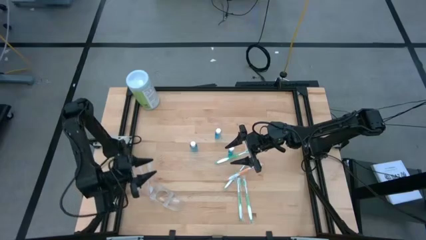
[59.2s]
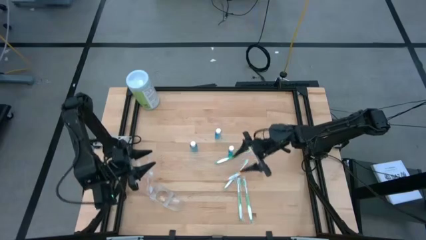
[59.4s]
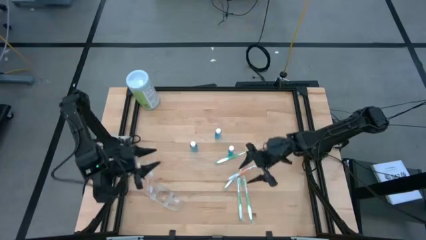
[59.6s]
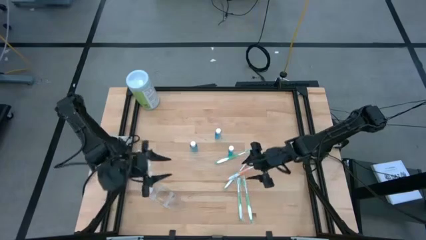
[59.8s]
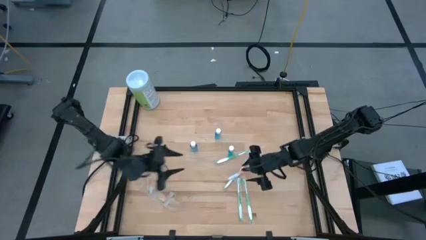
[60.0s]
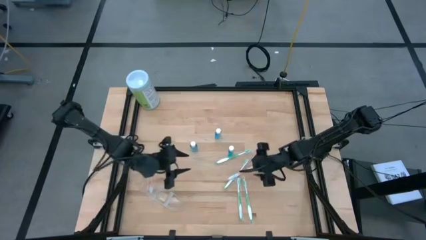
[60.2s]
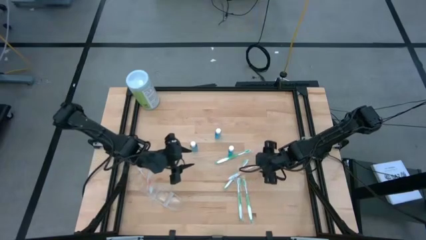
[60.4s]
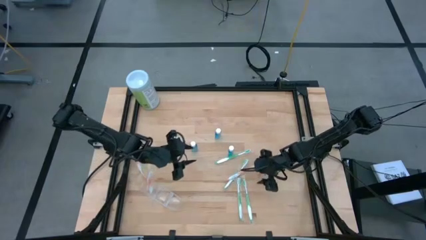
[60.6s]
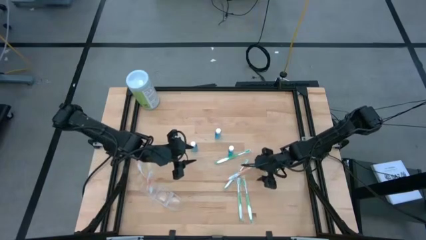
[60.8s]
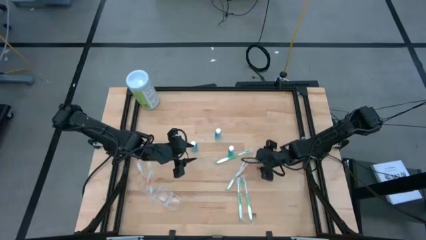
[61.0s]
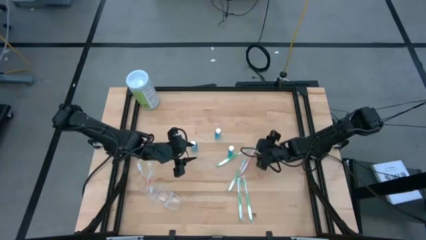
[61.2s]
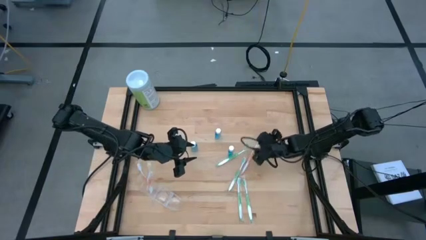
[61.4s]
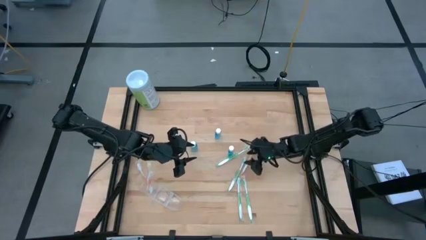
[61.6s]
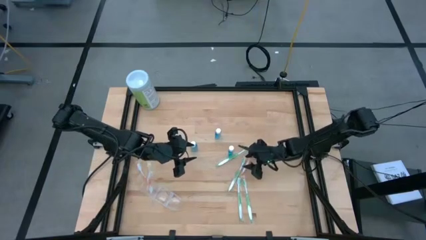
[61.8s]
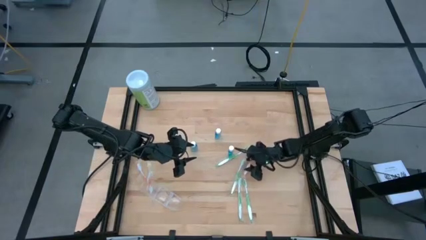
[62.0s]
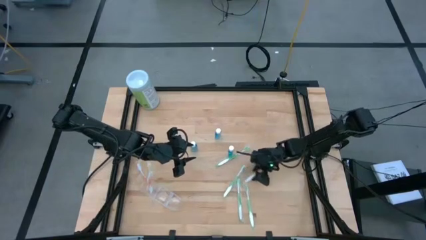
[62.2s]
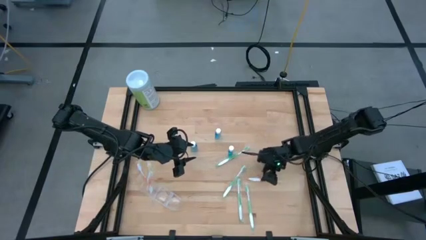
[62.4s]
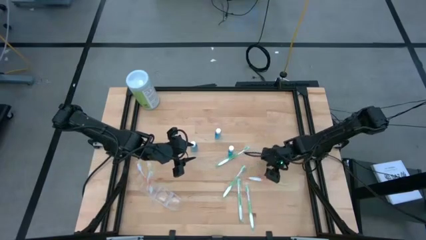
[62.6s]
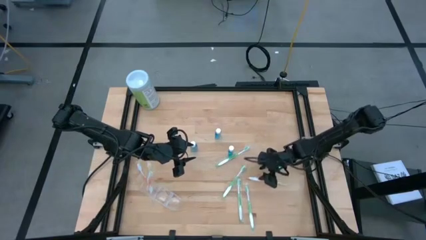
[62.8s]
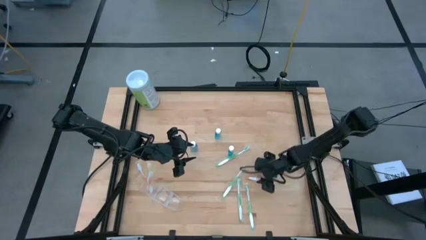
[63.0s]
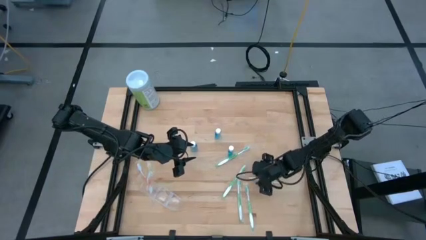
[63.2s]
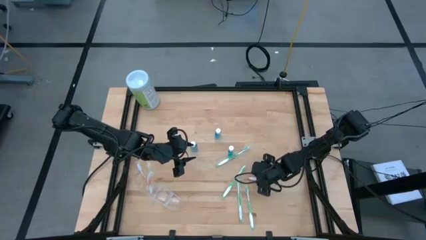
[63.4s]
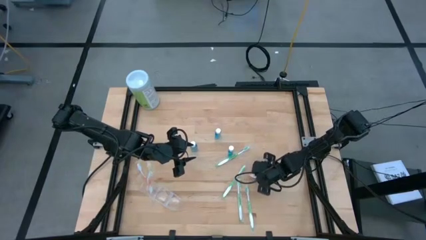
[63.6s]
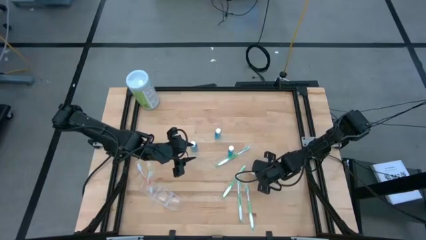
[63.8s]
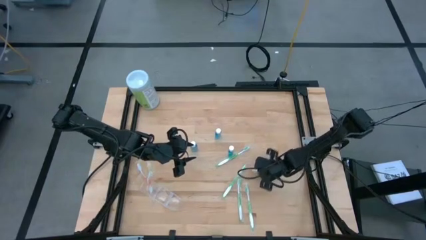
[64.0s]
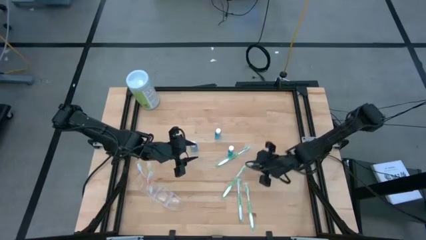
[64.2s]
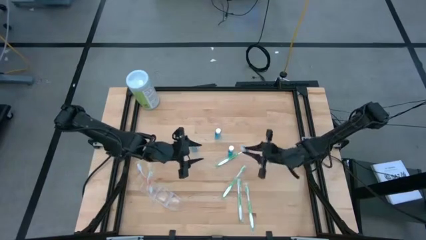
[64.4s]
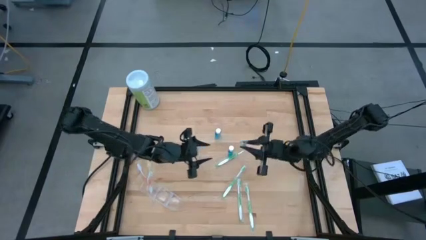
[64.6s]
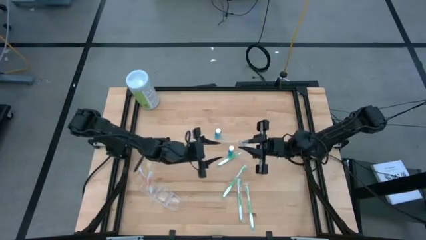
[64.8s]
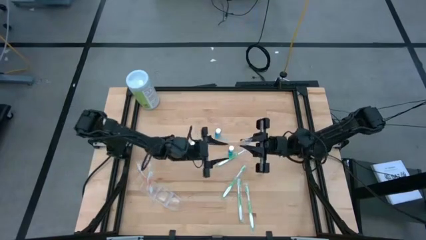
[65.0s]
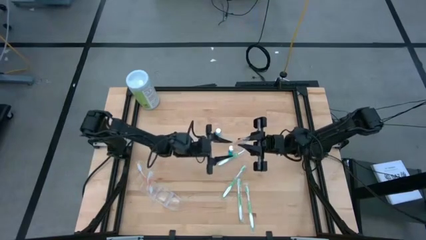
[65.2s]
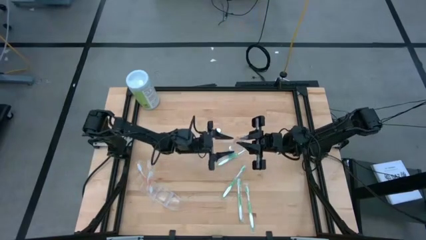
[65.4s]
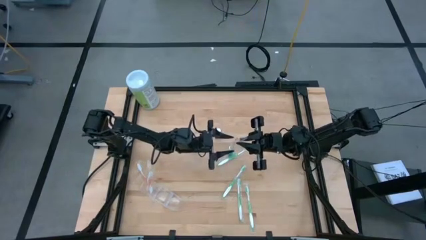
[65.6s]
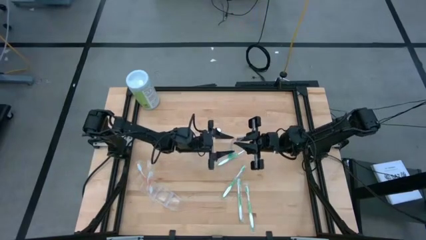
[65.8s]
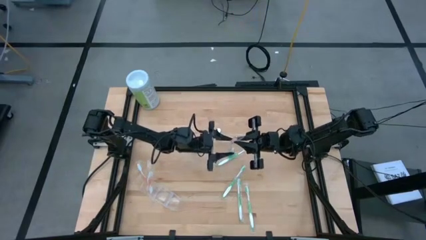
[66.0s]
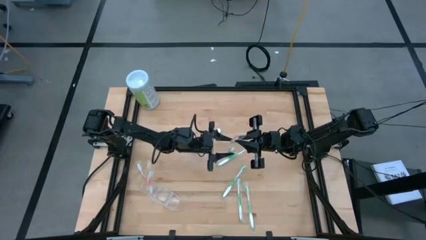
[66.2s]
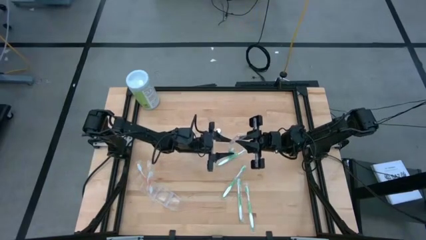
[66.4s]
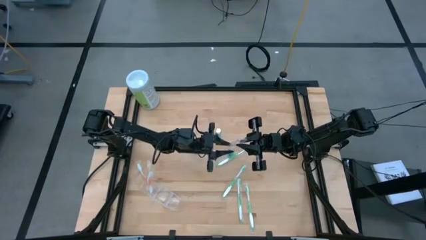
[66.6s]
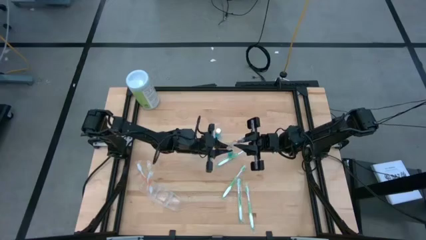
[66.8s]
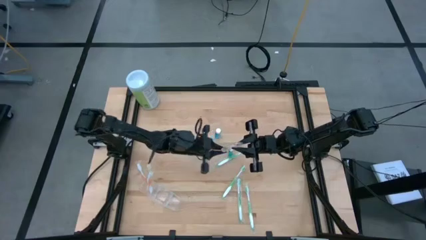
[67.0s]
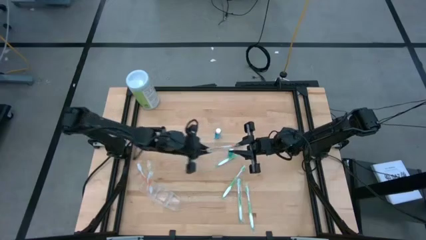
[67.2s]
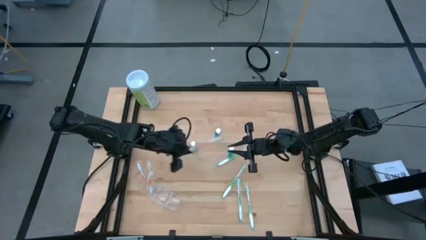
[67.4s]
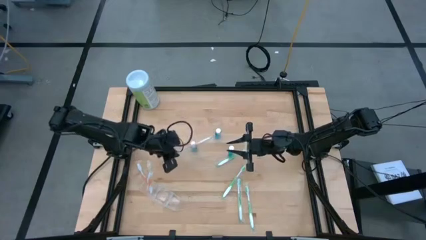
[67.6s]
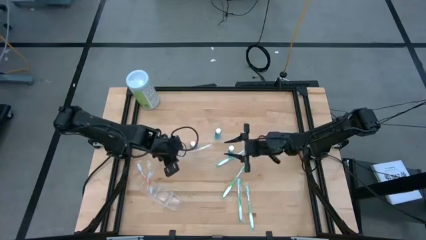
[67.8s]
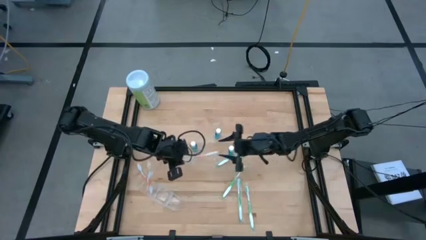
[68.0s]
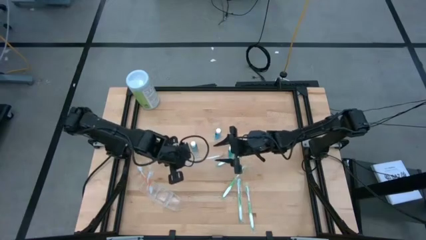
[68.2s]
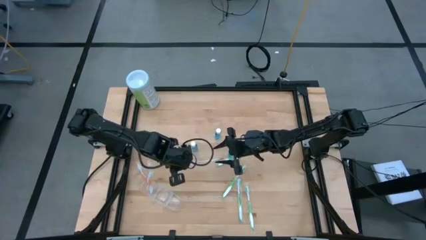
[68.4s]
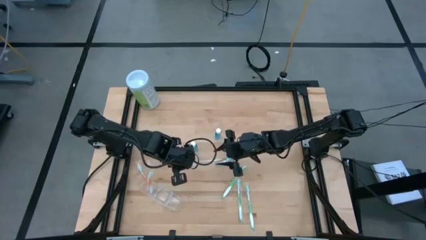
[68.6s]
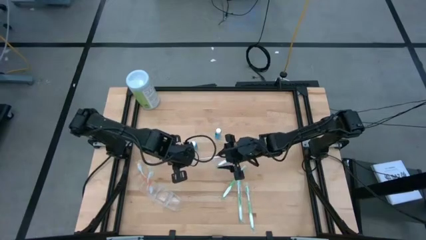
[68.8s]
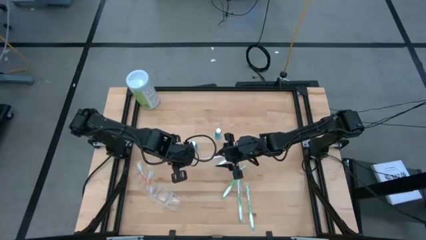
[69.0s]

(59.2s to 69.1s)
Task: Pick & Place toothbrushing station
Put the orange toothbrush into the transparent organizer

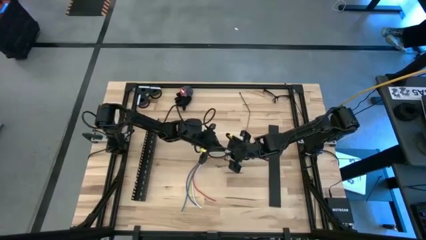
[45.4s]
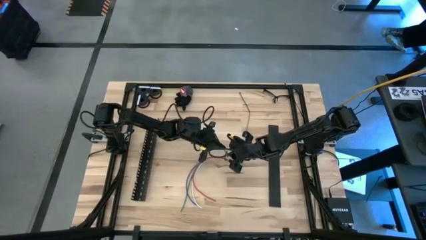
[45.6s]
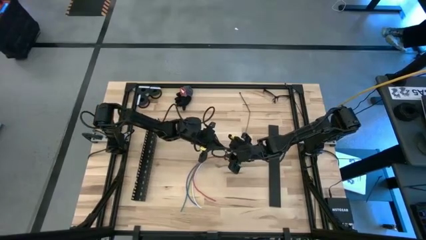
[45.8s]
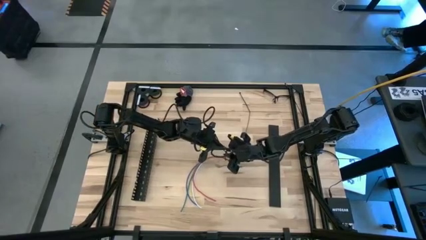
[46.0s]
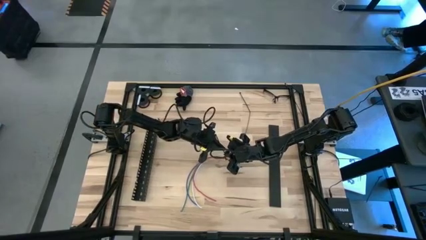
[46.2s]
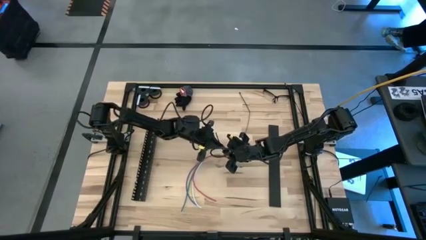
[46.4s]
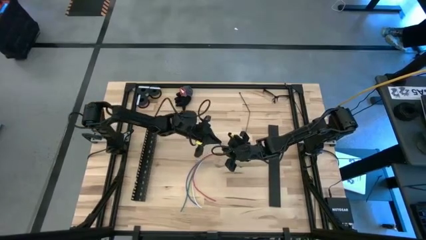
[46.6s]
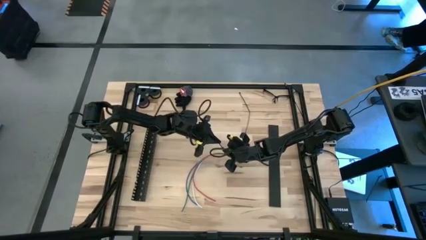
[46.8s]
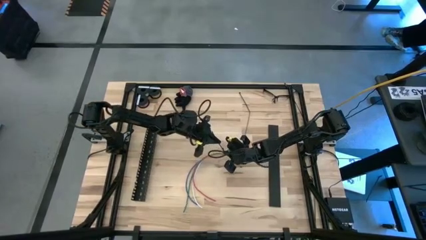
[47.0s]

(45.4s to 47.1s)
Task: Ziptie cables
Wrap the cable wires with the black zip tie

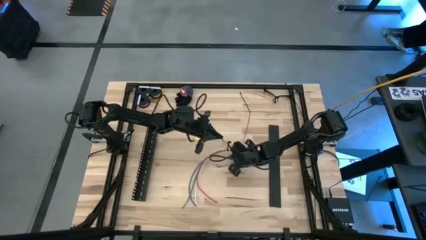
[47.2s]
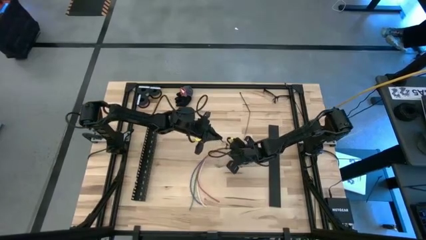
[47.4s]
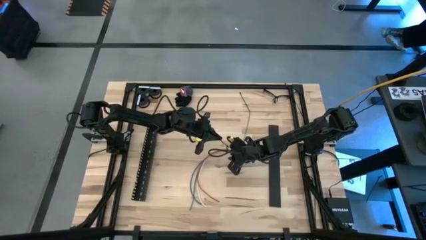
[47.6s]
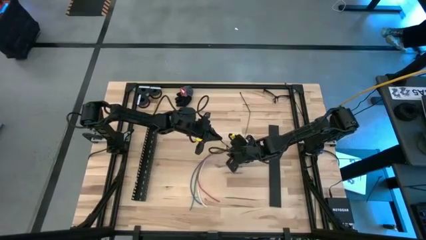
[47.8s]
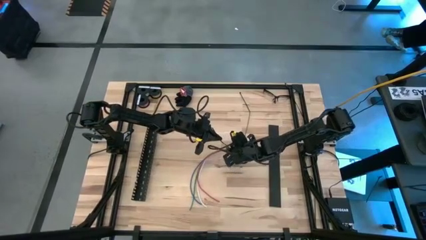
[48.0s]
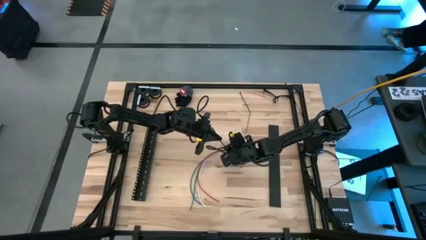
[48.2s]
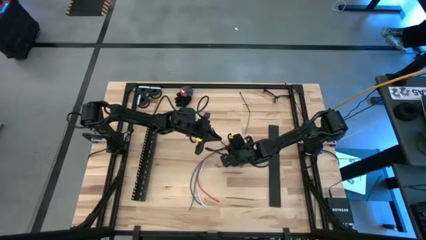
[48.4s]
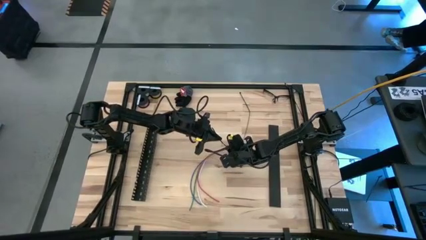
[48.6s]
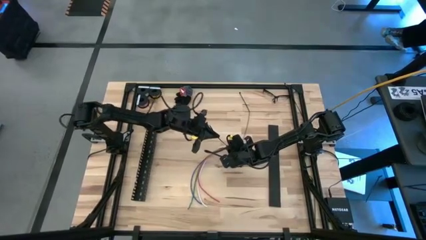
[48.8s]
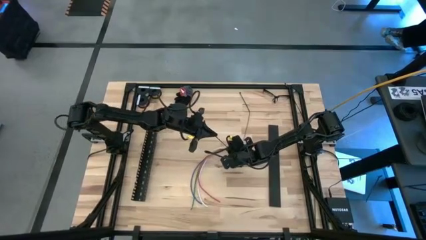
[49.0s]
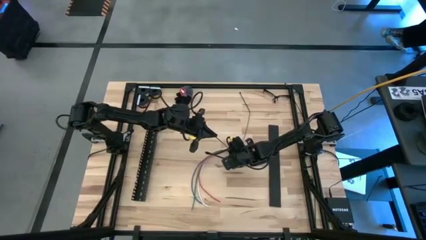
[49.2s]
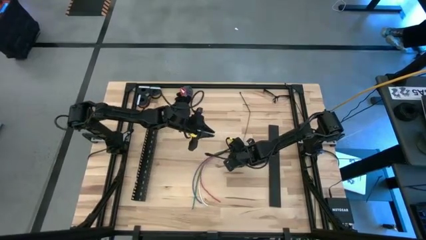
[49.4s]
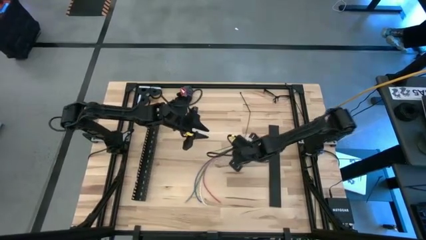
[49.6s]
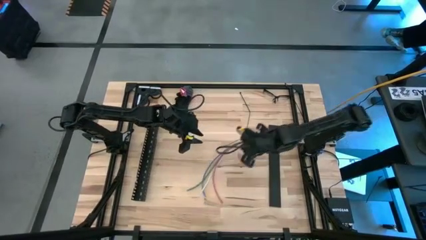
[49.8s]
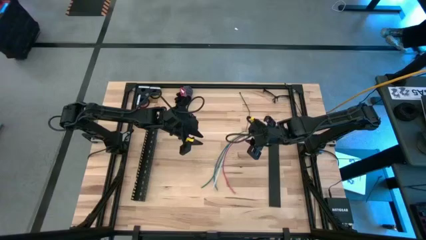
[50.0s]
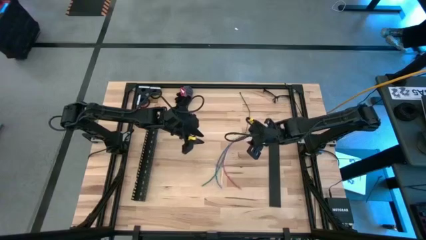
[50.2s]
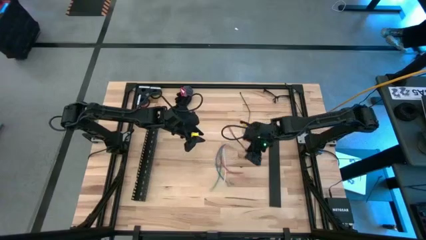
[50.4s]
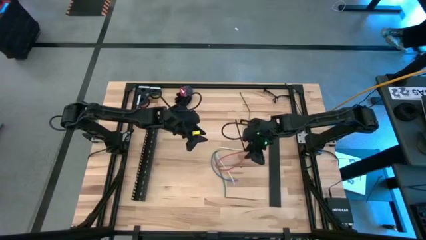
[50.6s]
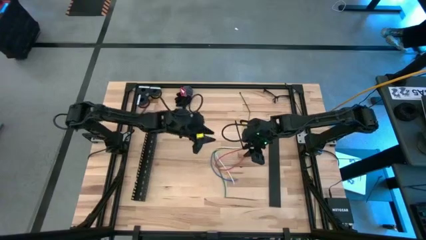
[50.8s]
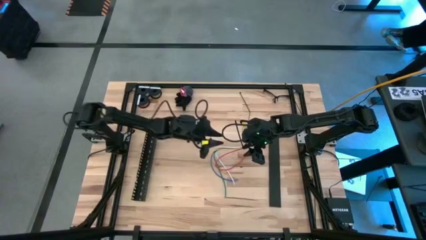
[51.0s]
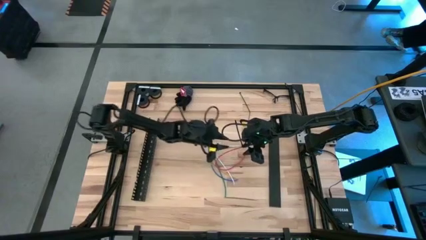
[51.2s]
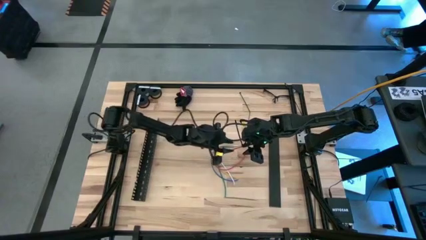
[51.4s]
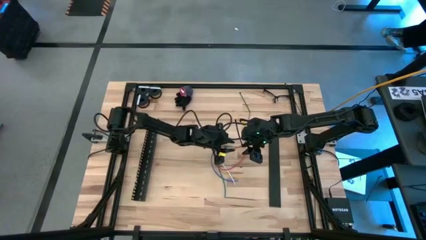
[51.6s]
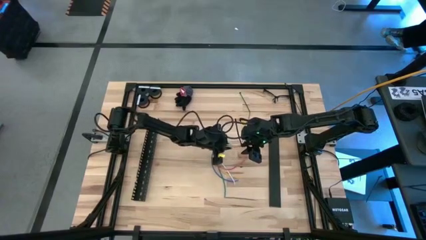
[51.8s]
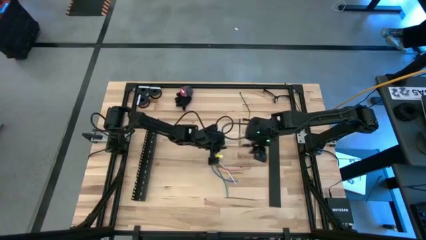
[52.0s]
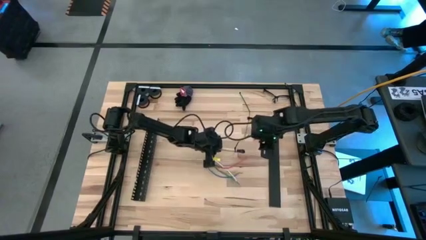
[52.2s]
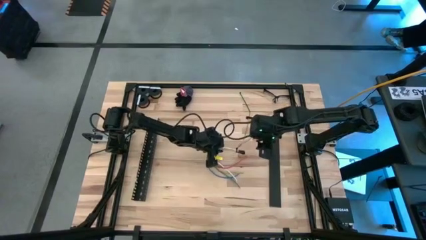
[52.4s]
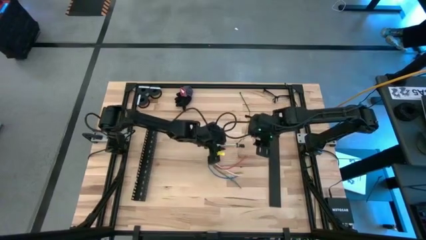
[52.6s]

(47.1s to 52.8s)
Wrap the cable wires with the black zip tie
